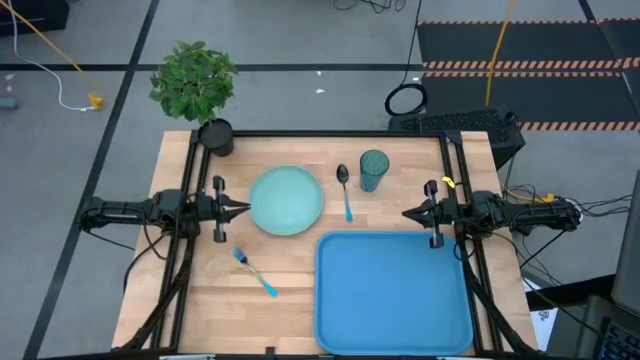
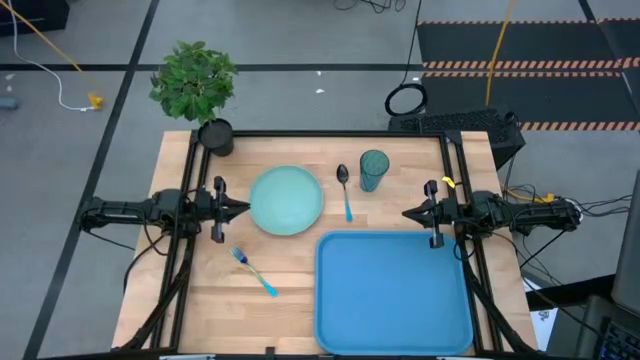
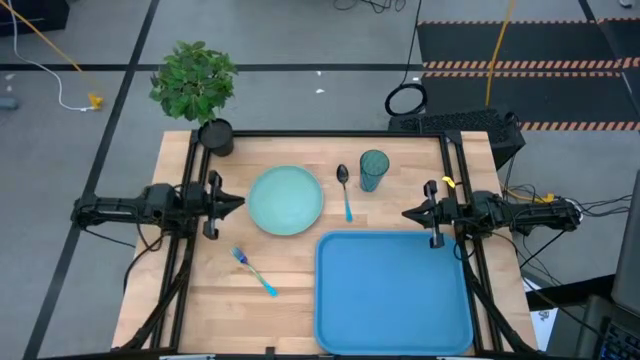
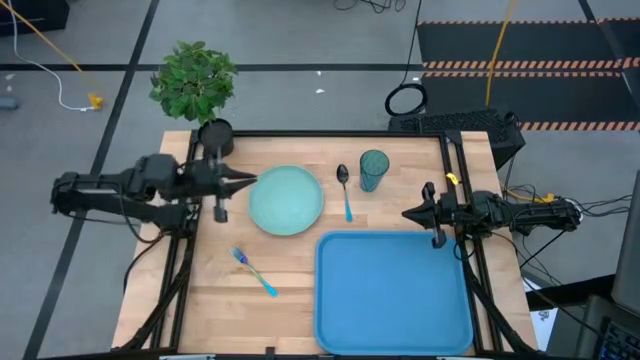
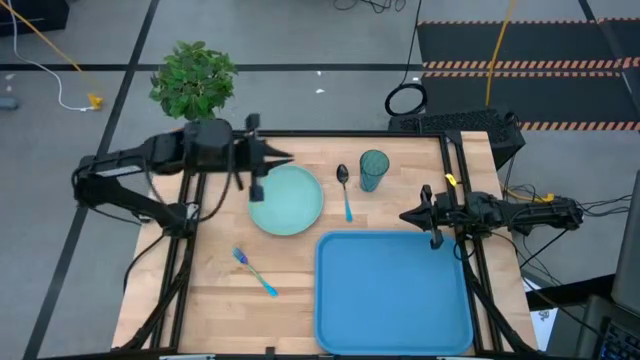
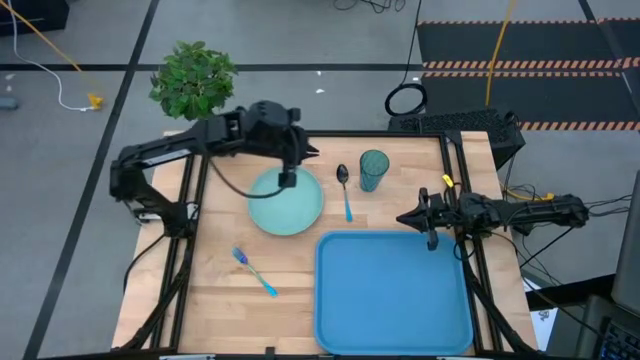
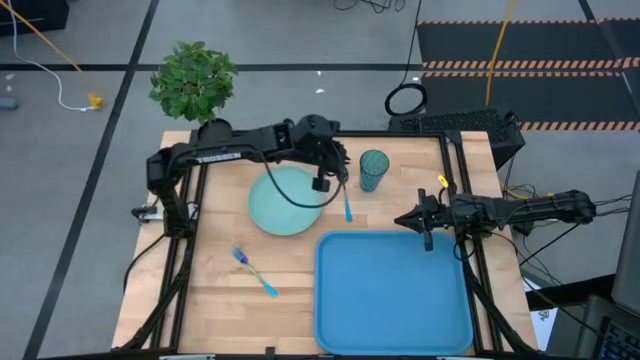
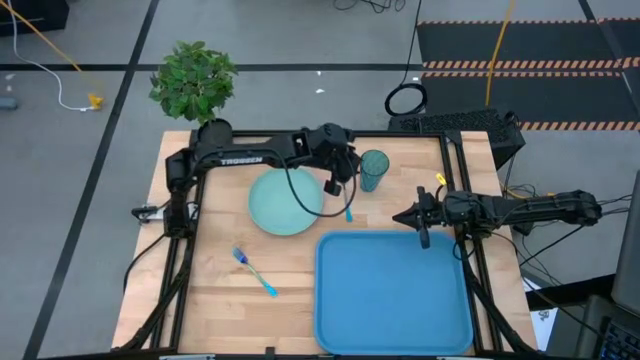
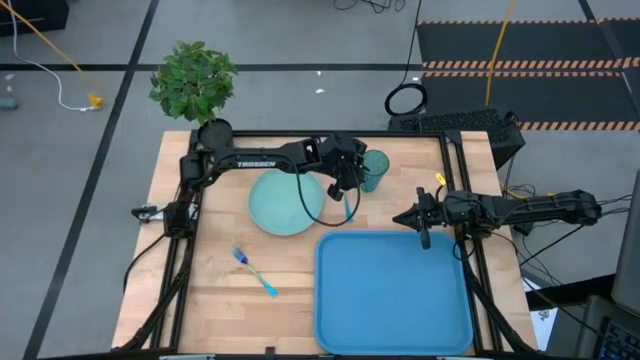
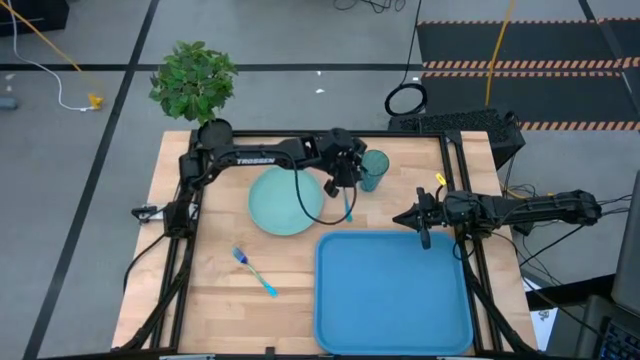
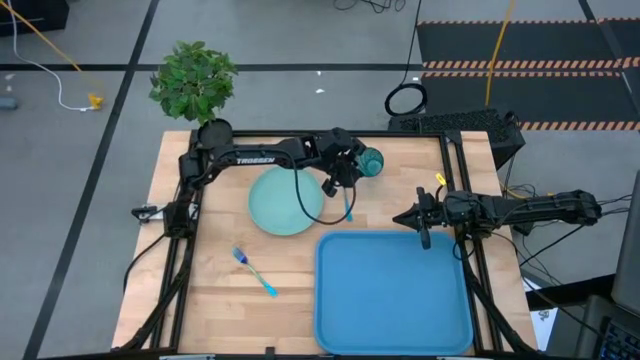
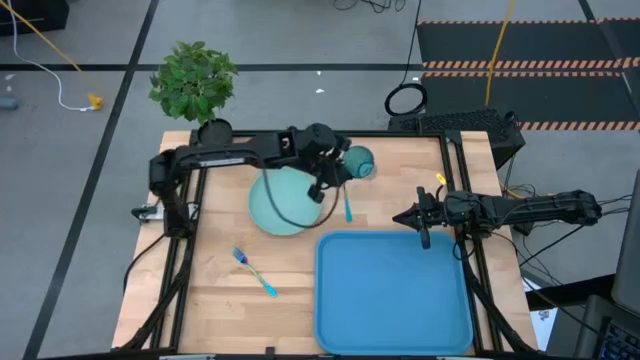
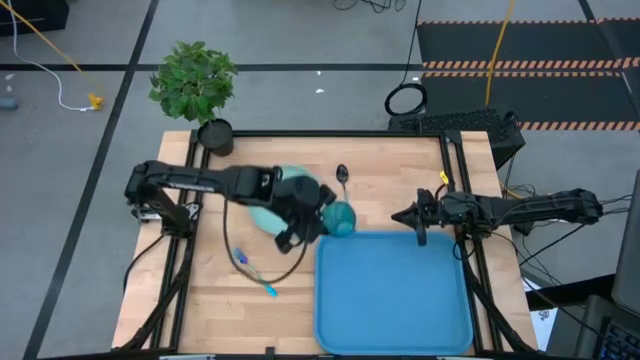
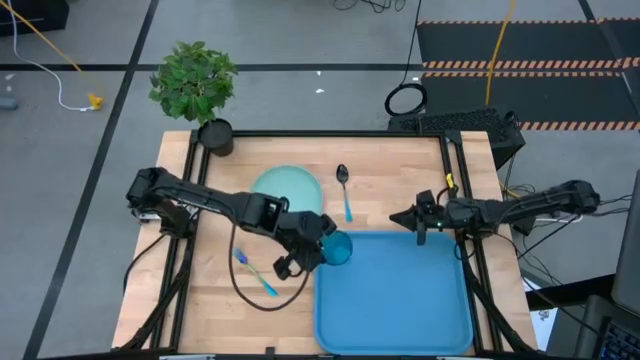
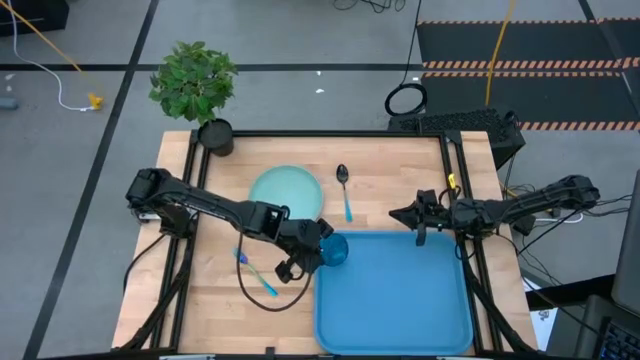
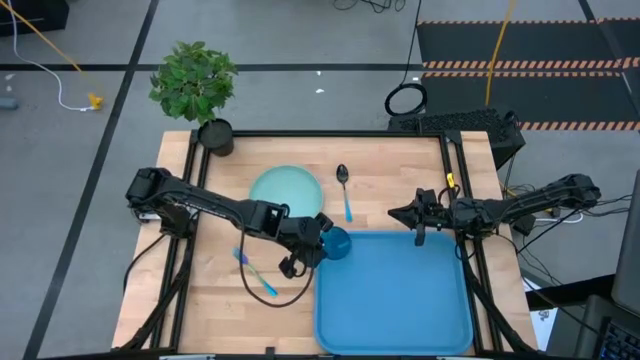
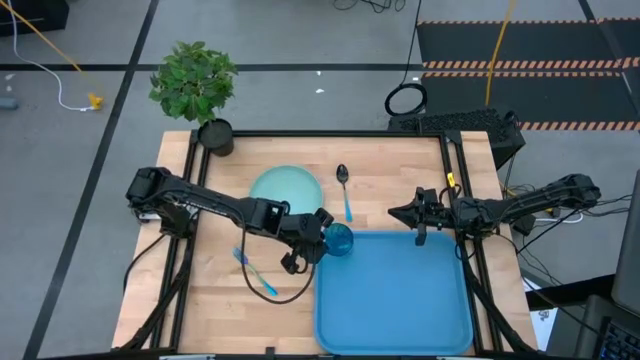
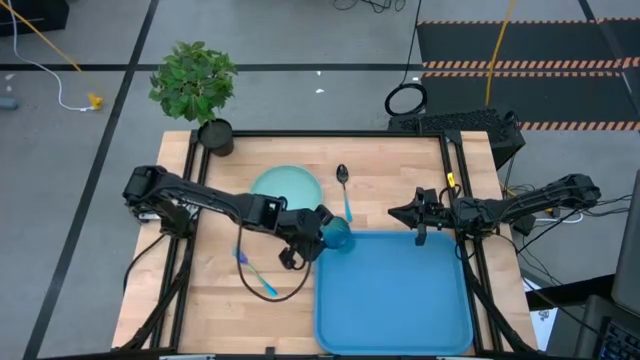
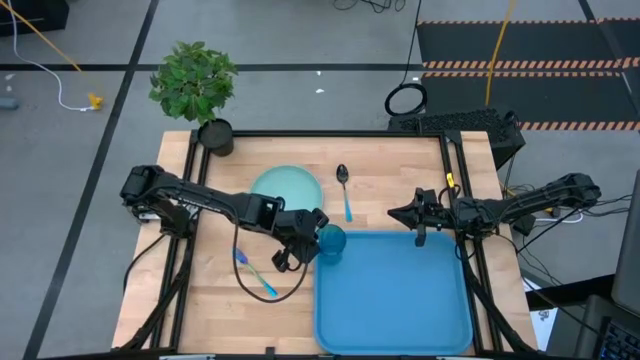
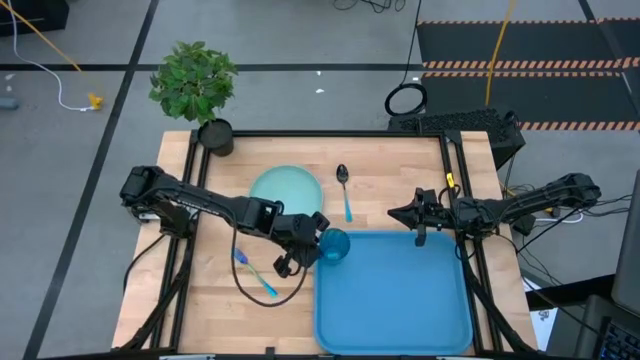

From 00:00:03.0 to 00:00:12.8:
Task: Pick and place plate/cup/fork/spoon on tray
Put the glass cup into the food tray

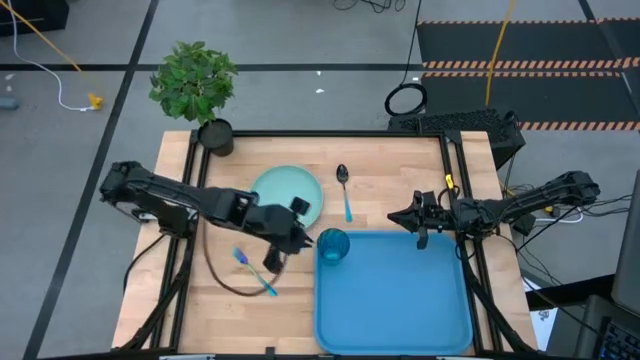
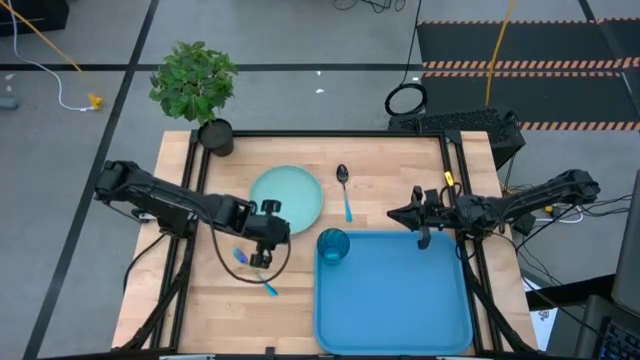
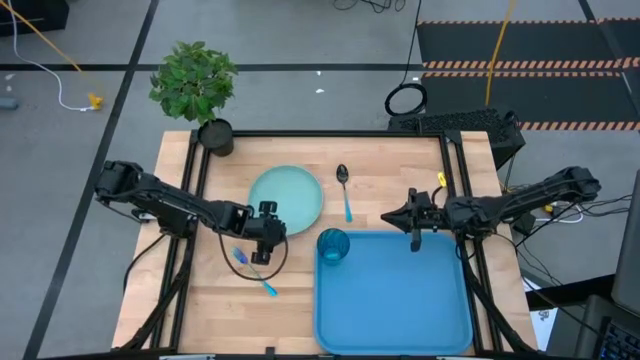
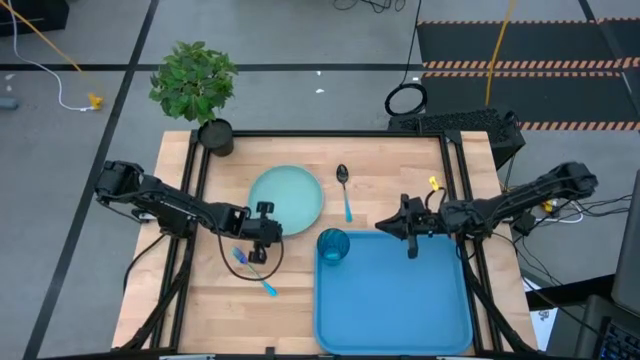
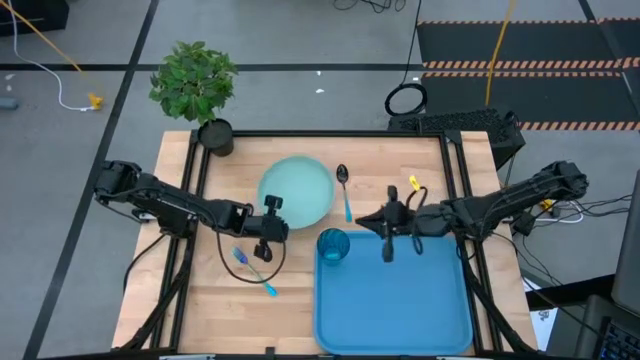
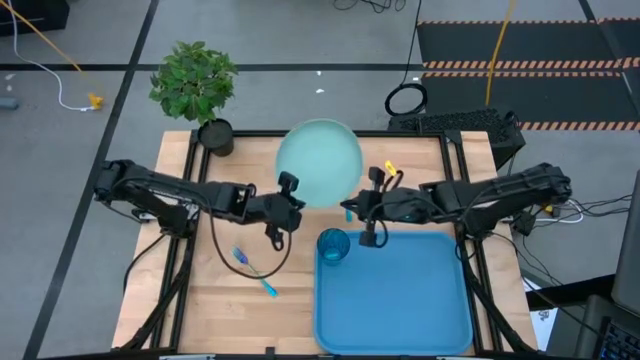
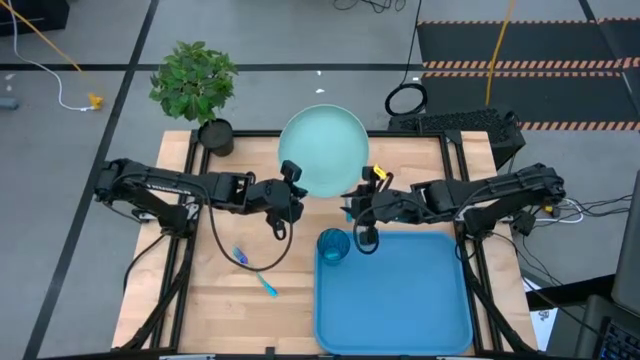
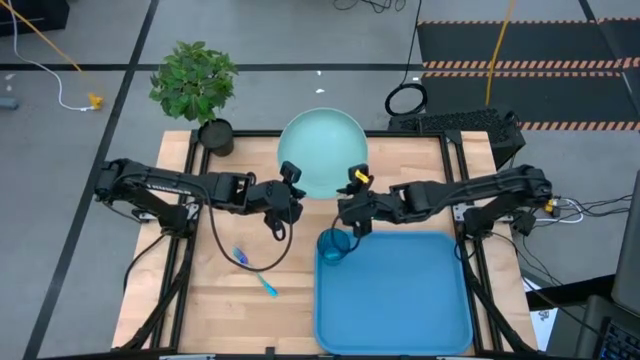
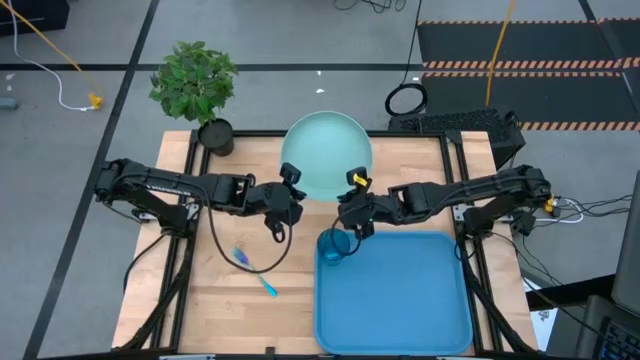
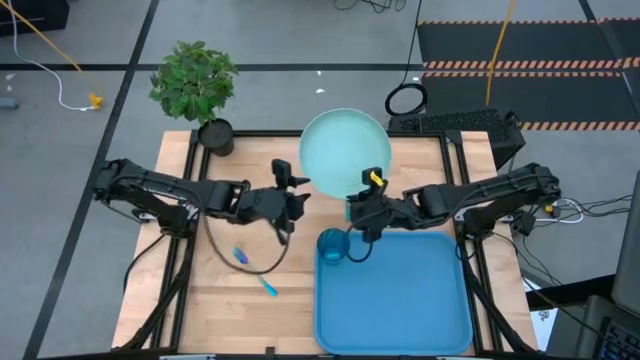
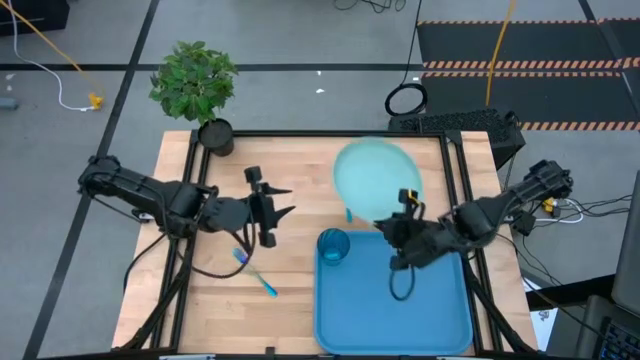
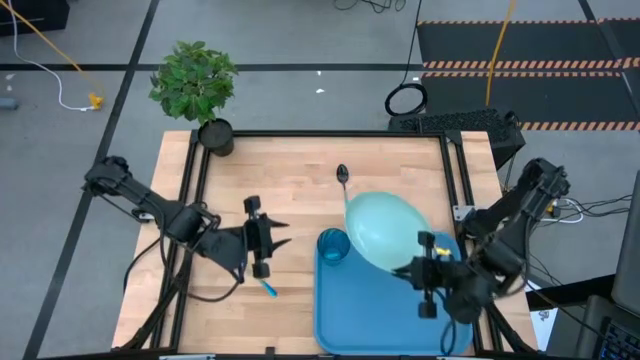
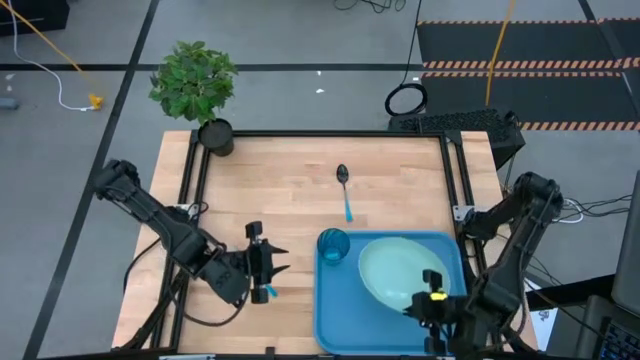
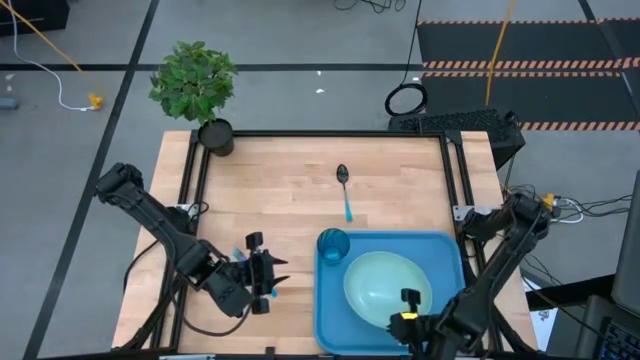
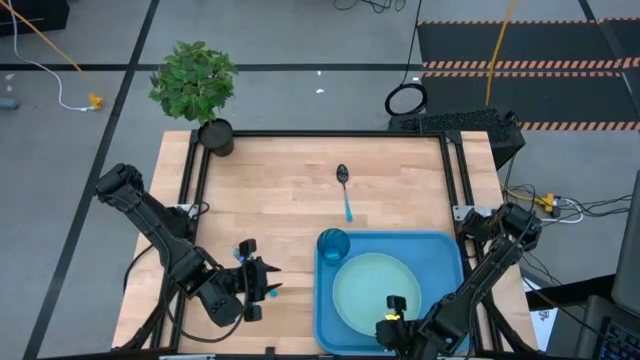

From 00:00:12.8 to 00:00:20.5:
Put the plate into the food tray

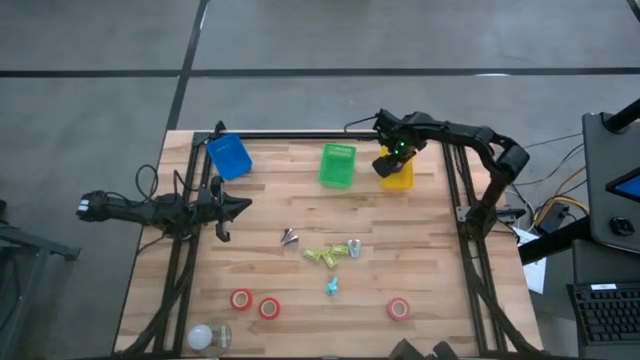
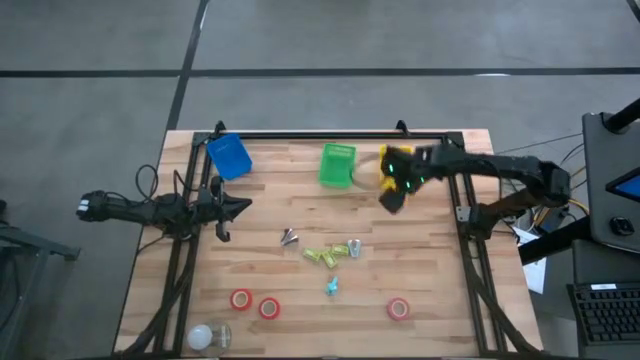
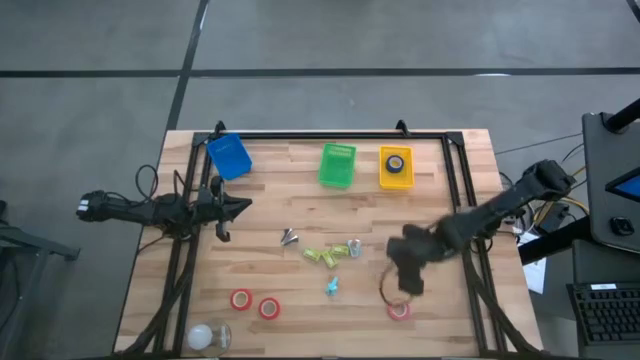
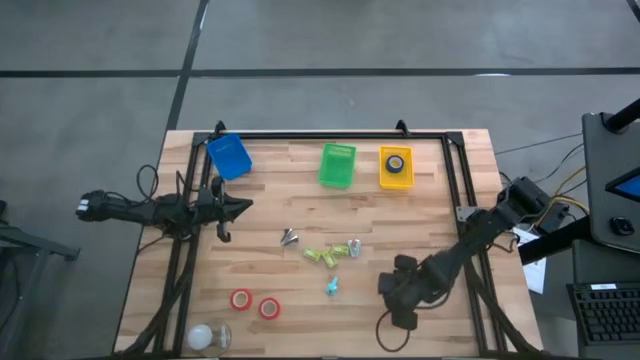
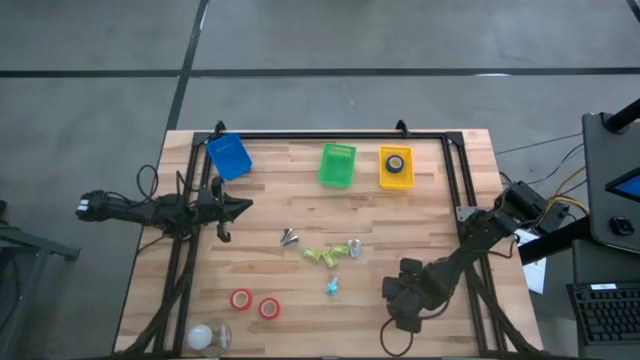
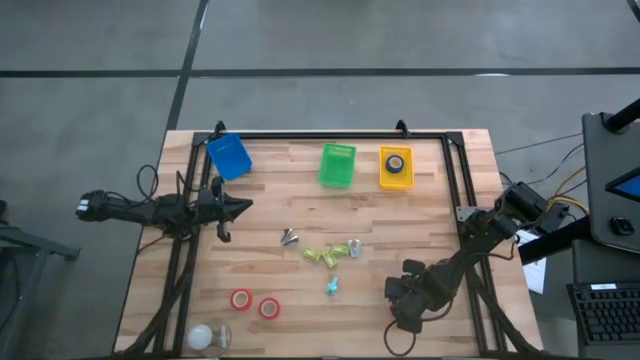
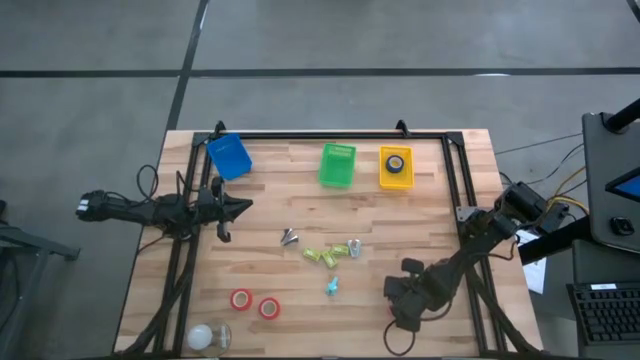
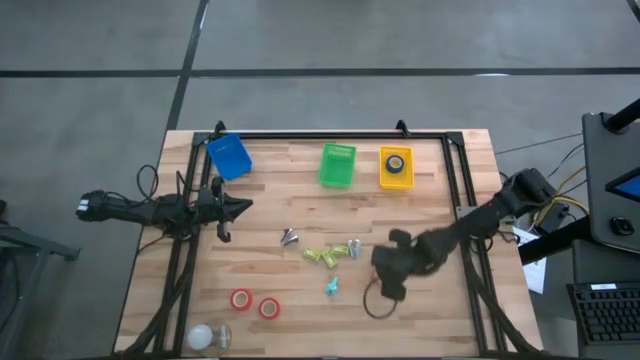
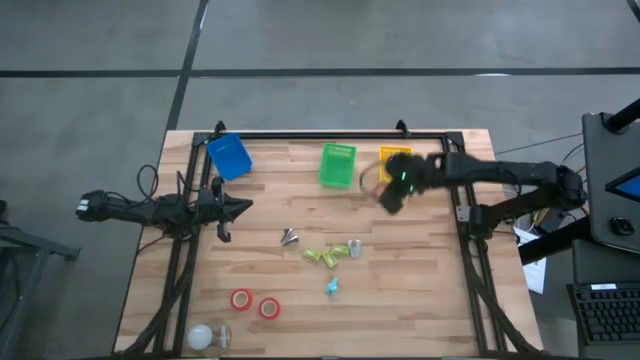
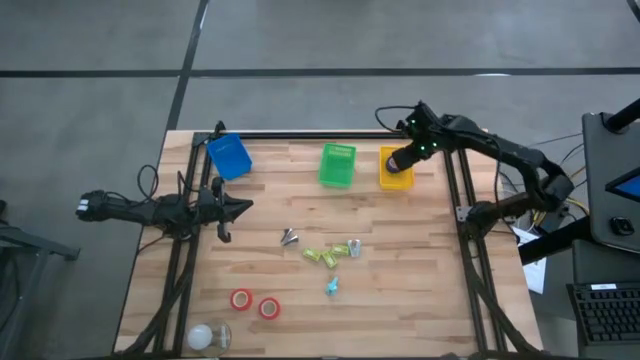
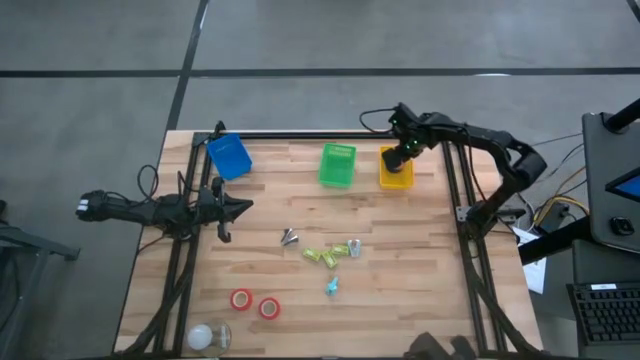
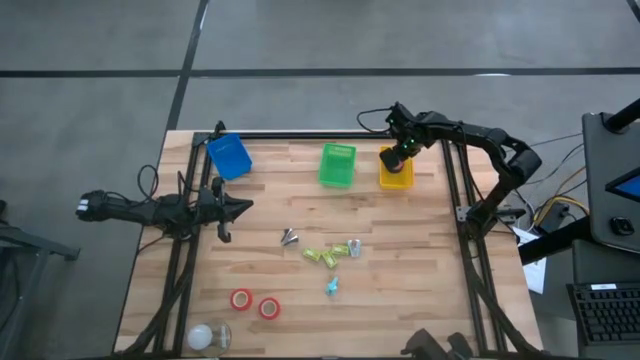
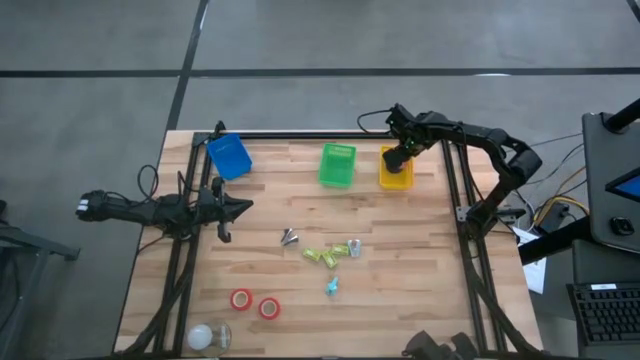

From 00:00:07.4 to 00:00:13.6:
Task: Pick and place Stapler, Stapler remover, tape
Put the pink tape into the yellow basket
